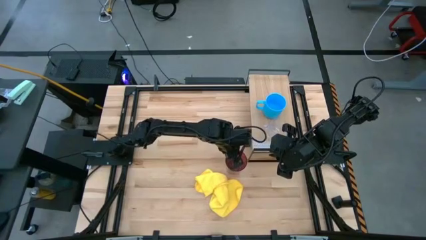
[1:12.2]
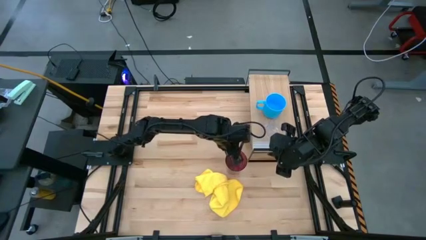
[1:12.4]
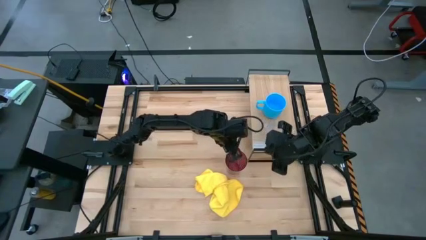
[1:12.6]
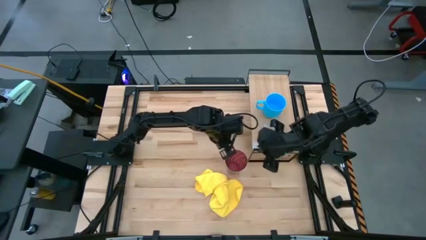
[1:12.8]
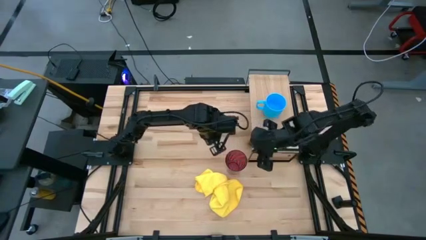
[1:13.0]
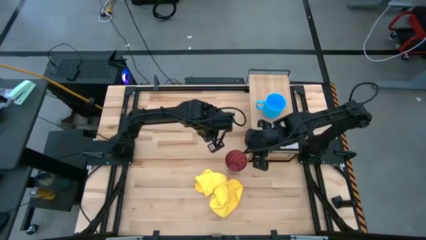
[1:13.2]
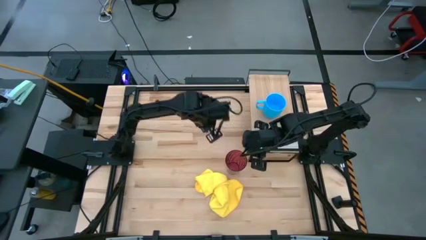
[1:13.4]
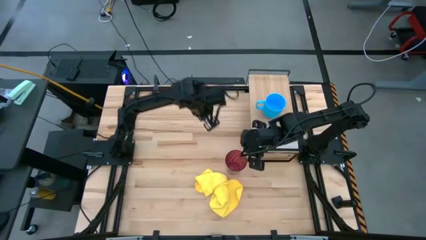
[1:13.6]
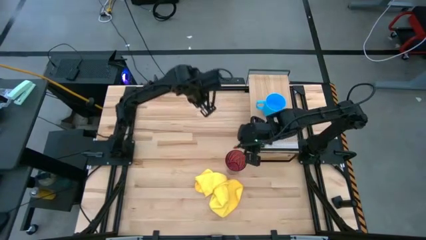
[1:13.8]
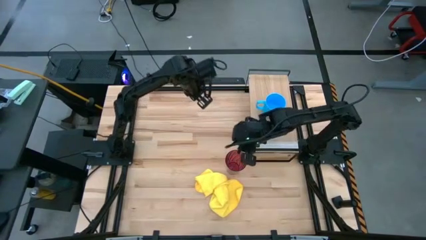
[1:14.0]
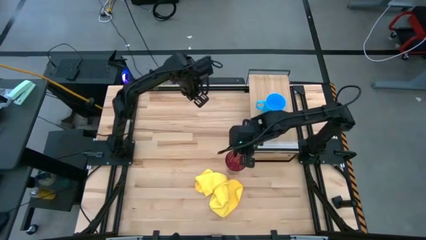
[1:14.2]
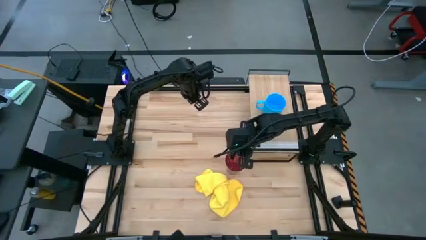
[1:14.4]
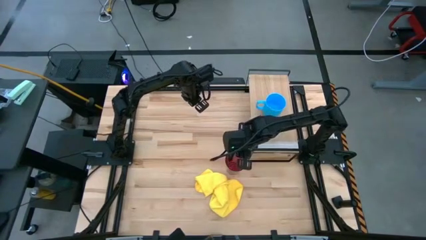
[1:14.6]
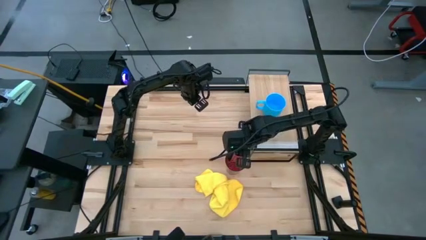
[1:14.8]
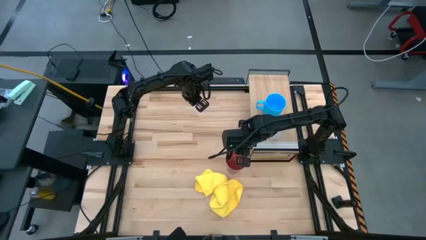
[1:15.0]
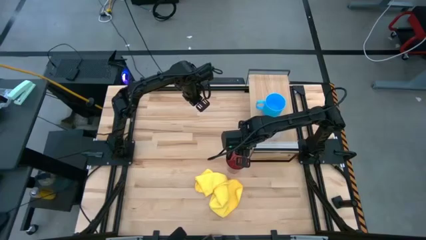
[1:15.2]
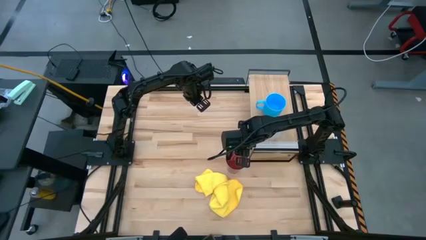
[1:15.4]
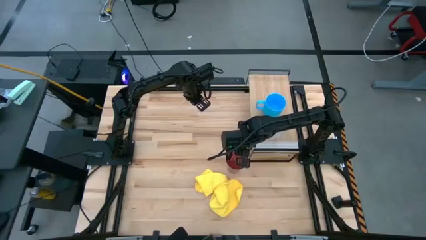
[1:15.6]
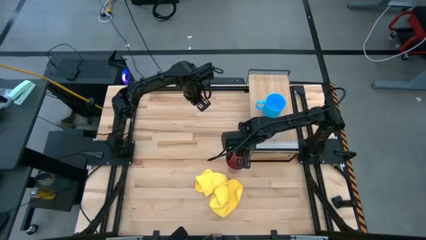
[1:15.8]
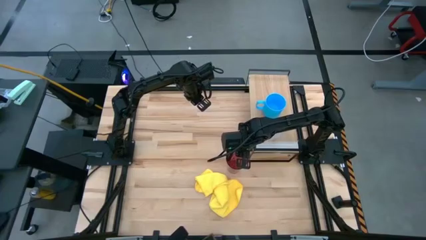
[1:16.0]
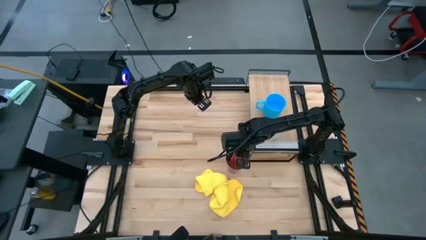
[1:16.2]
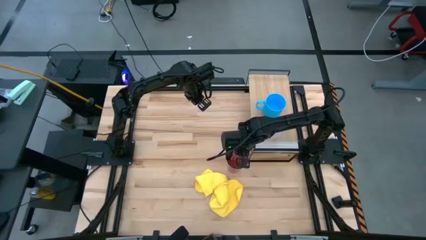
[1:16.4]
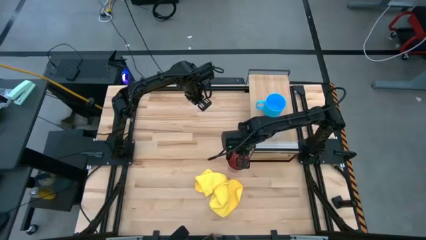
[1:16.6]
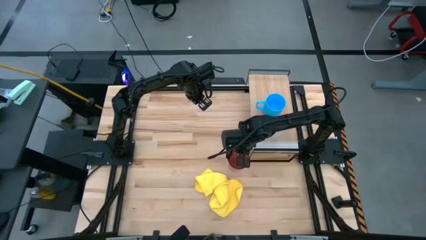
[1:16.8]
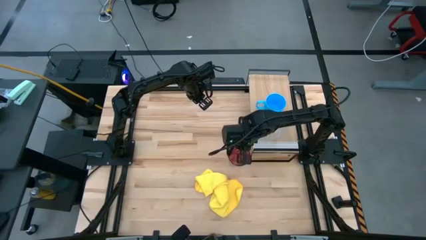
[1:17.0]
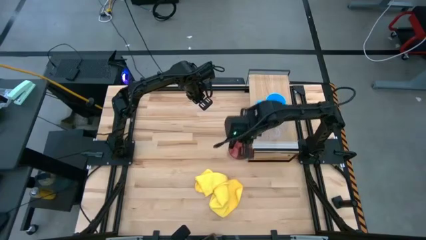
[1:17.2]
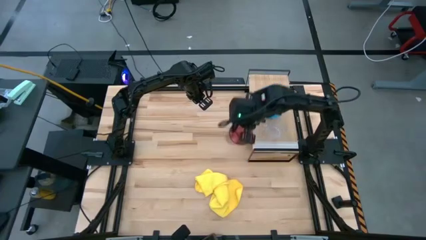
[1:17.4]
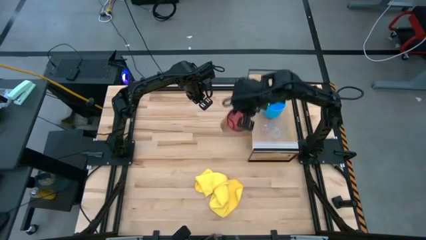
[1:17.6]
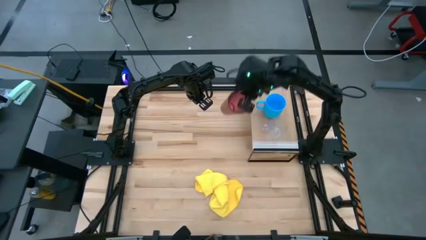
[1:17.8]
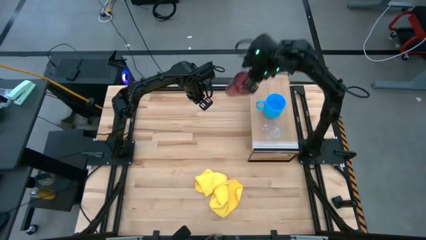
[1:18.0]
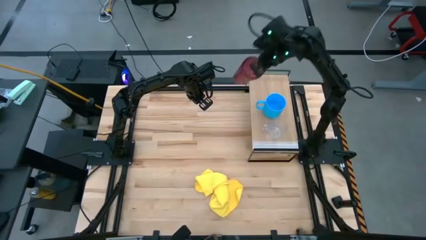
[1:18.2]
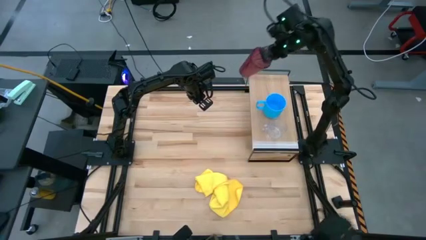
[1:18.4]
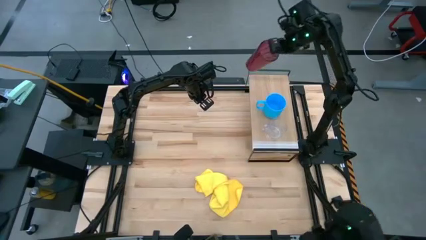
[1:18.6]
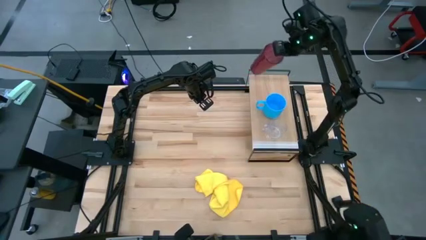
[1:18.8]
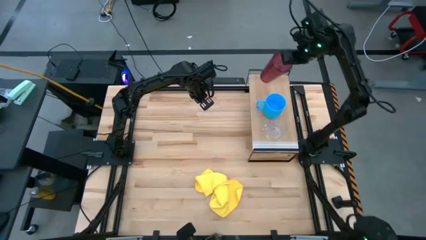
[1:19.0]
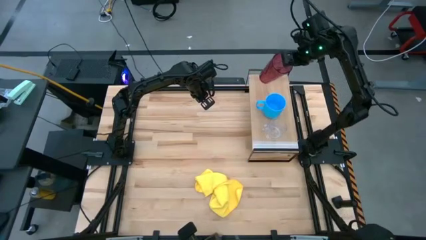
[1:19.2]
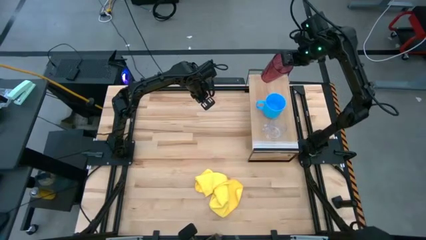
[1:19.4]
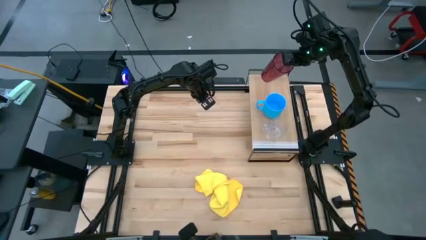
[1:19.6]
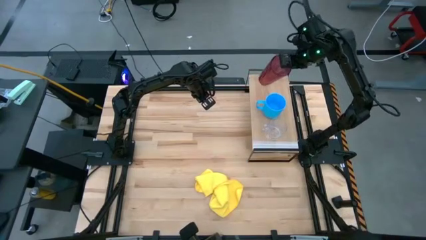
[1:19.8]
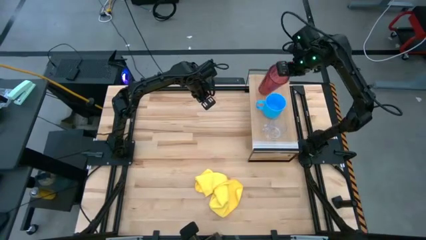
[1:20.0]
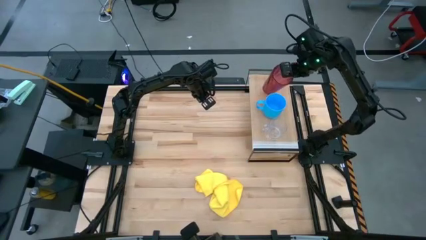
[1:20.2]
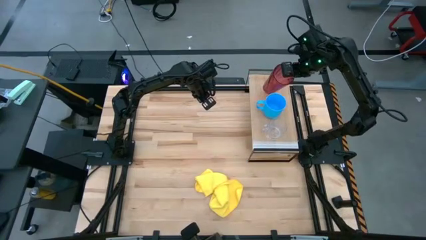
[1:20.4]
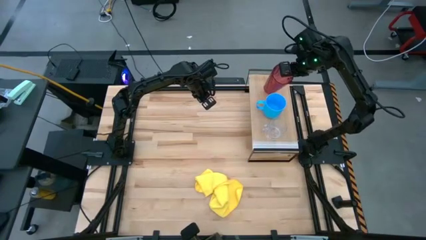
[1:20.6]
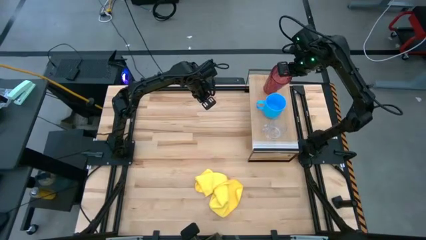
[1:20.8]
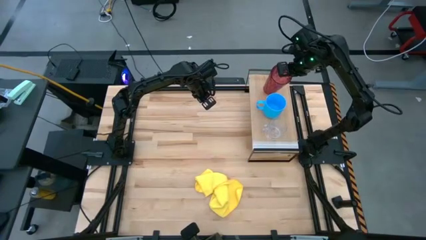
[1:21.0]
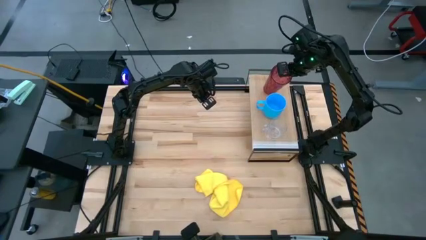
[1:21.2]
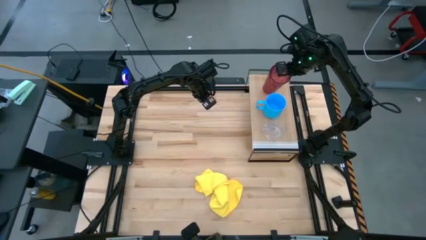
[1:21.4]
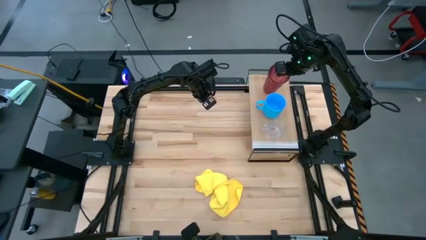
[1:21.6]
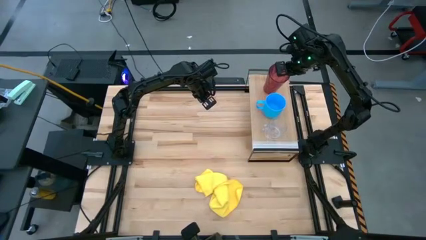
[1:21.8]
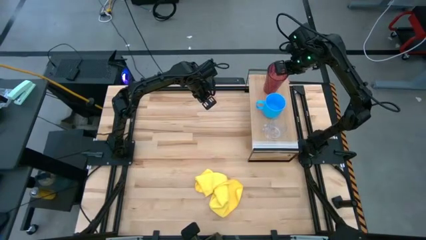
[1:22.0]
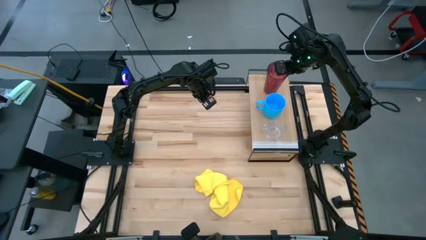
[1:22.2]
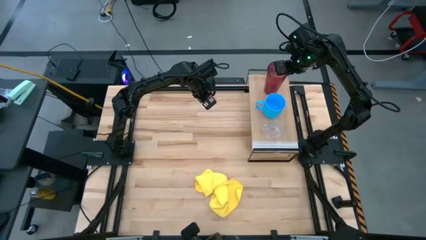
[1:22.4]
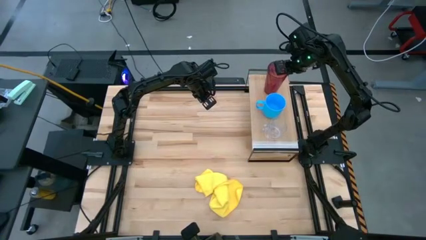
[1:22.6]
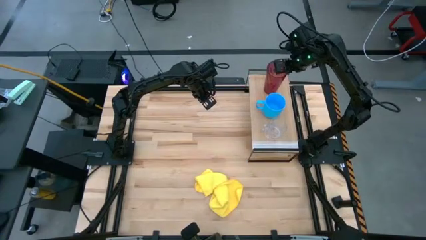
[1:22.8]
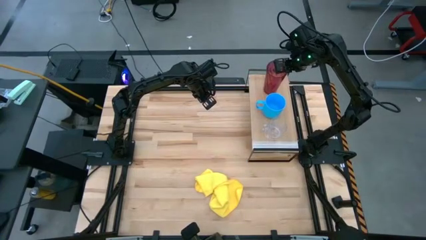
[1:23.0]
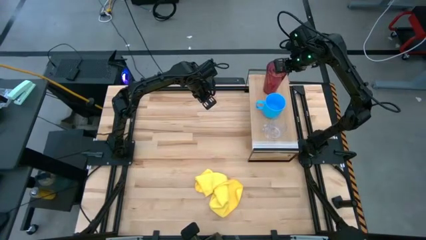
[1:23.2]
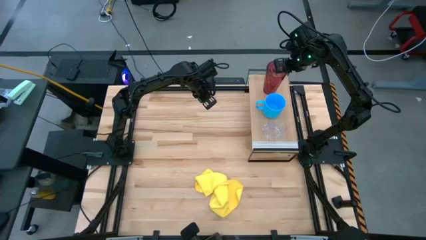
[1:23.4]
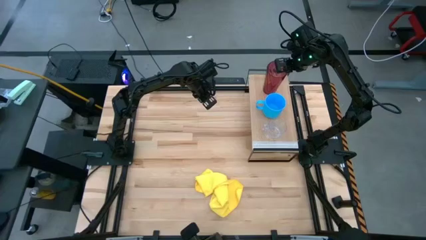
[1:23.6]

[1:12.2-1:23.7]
Task: Stack small to large cups/mugs on shelf
Put the red cup on the shelf

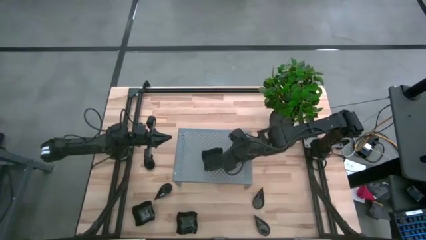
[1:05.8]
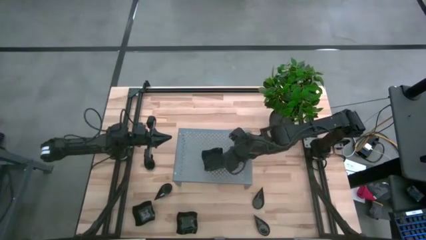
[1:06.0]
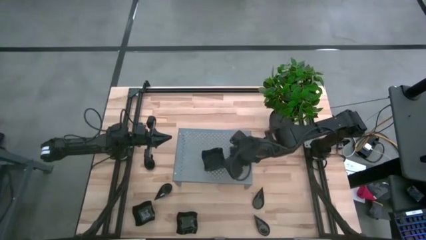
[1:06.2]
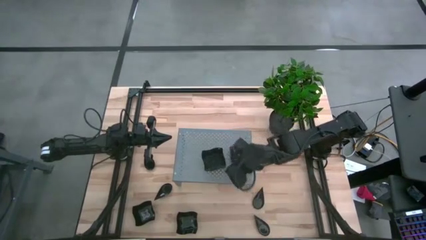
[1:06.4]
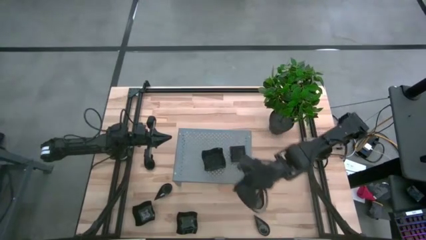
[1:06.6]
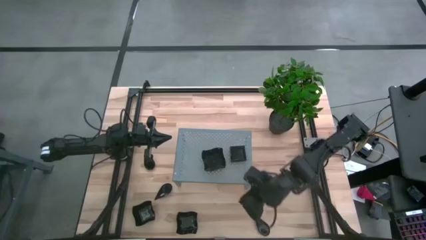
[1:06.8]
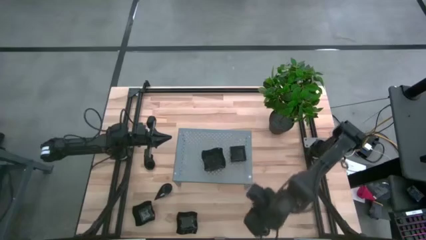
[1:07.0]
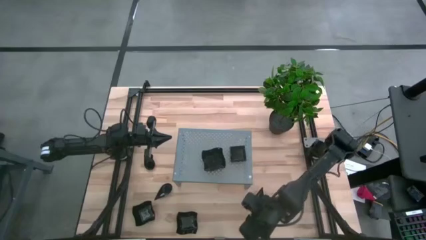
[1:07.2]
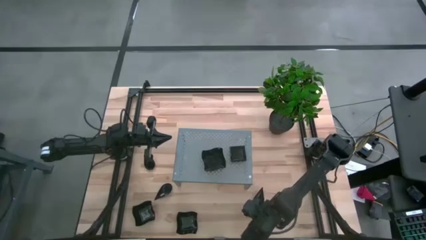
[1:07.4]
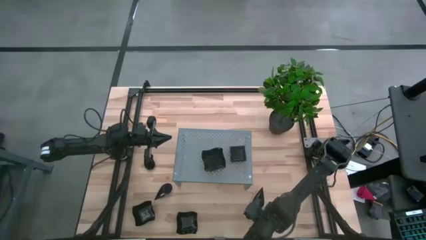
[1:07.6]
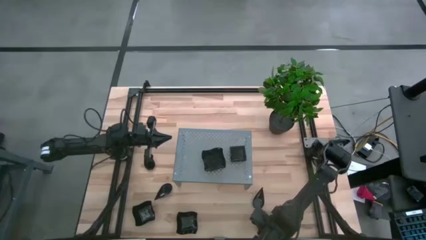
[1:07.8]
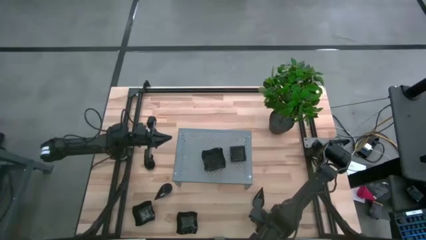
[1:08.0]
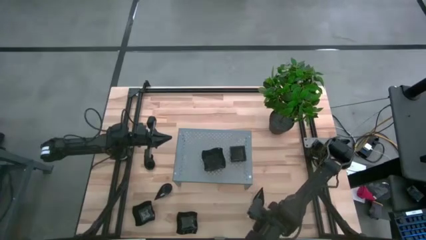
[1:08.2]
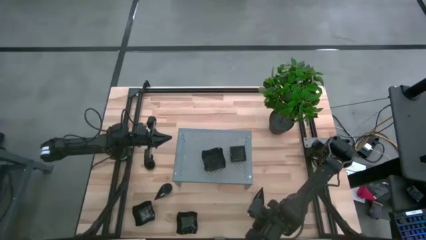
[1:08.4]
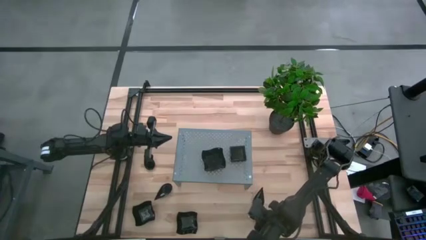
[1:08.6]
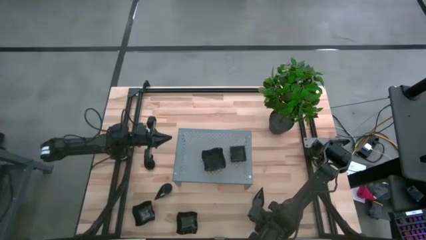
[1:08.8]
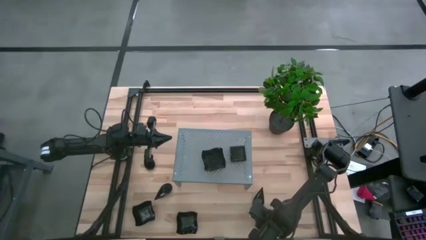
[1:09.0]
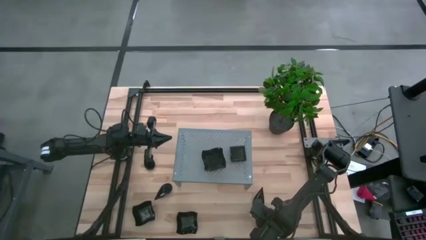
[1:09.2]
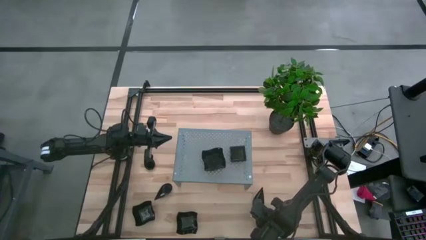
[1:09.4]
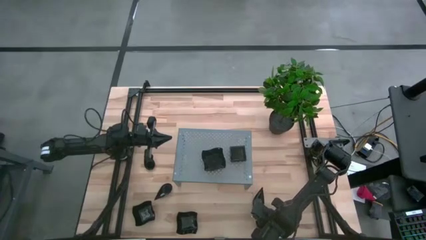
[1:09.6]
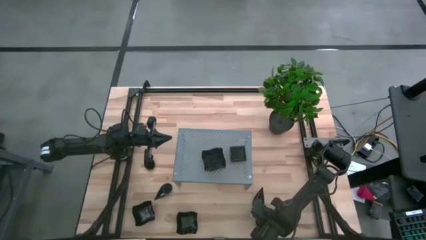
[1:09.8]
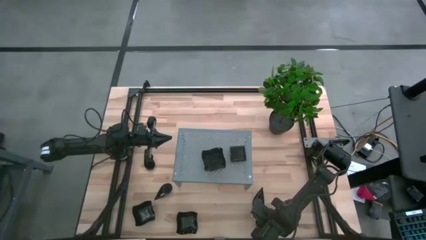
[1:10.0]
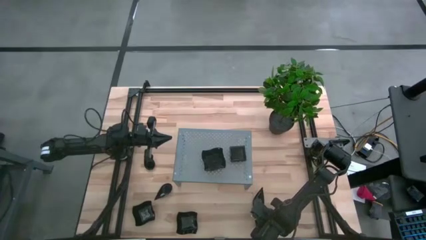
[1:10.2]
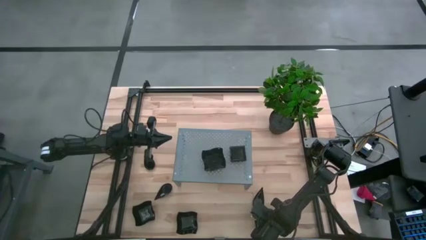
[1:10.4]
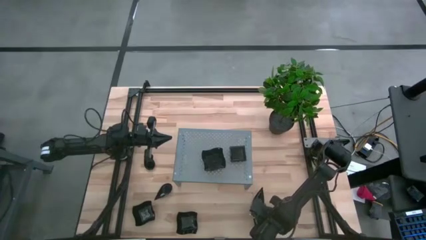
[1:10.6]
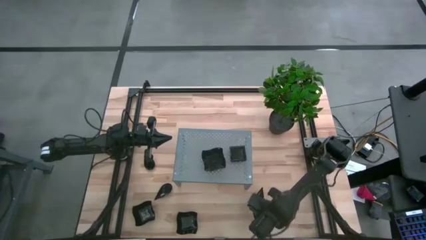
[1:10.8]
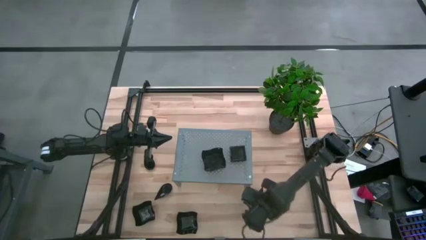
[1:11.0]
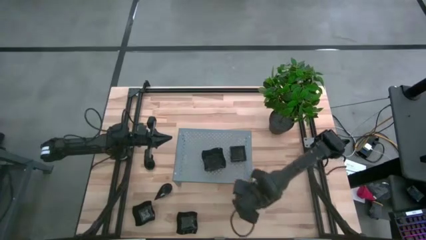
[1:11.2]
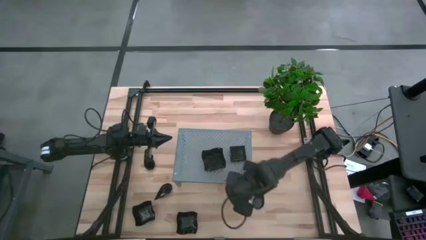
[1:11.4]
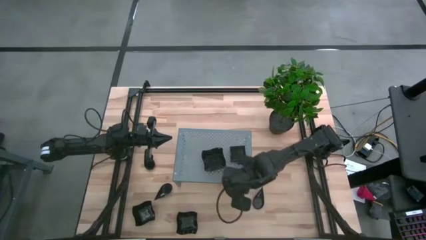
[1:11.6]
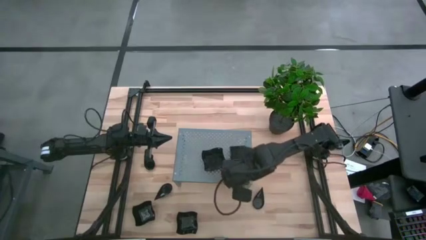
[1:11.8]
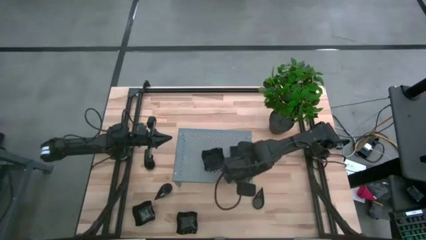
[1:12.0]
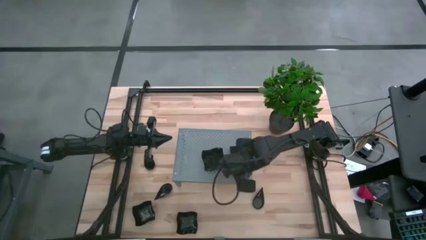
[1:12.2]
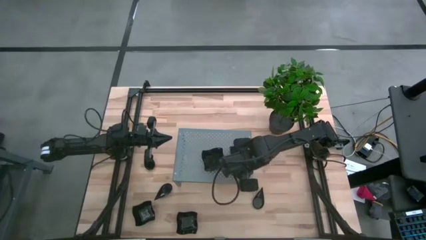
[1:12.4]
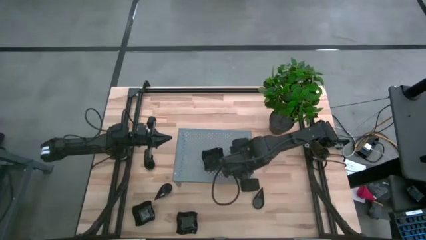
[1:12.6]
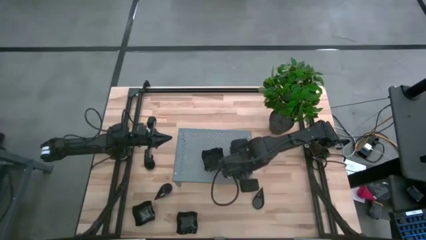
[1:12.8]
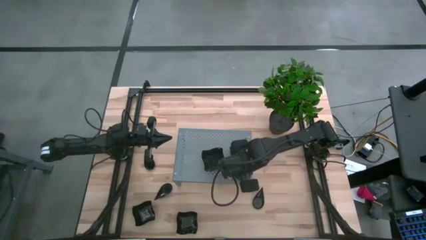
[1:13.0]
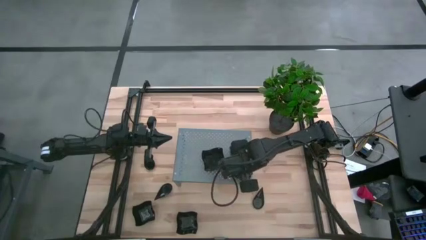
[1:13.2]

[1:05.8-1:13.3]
Task: Pick & Place Mini shaped plates
Put the bottom left black drop-shaped plate on the shelf
